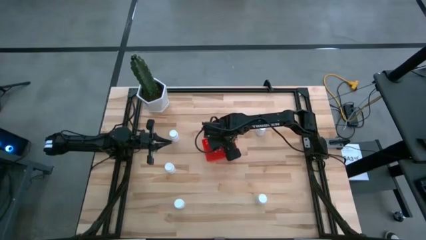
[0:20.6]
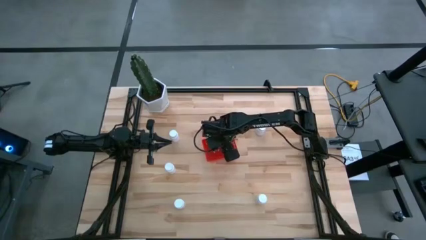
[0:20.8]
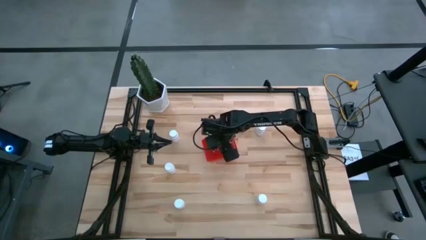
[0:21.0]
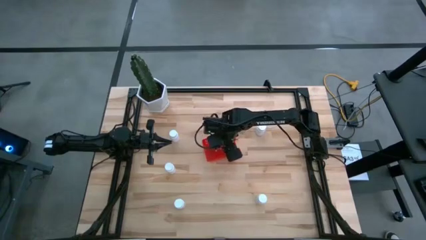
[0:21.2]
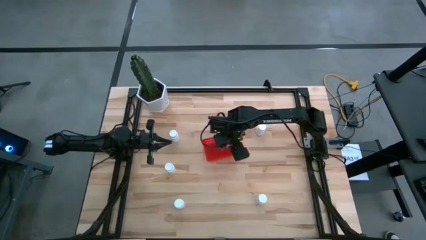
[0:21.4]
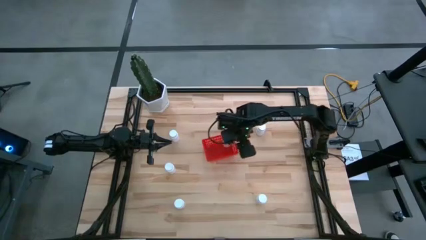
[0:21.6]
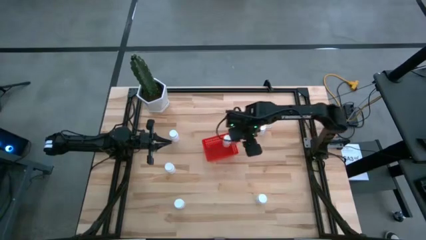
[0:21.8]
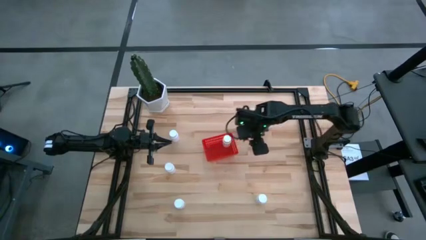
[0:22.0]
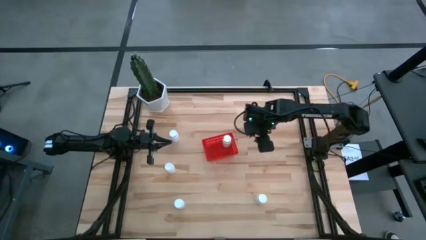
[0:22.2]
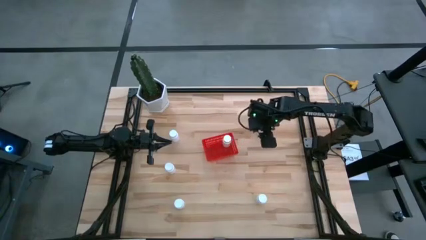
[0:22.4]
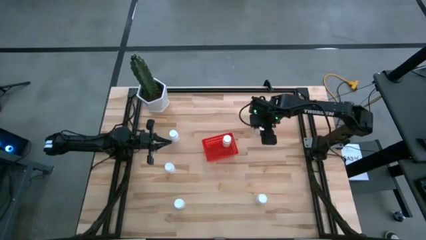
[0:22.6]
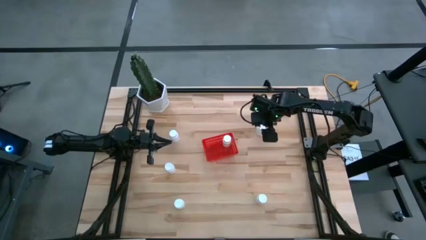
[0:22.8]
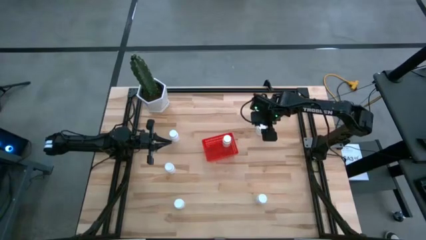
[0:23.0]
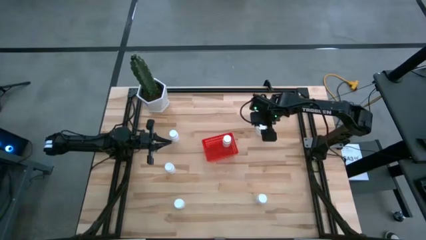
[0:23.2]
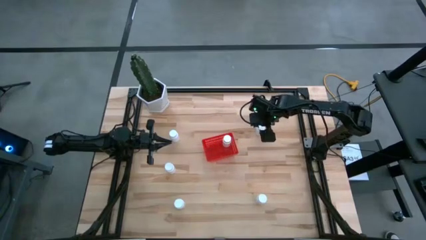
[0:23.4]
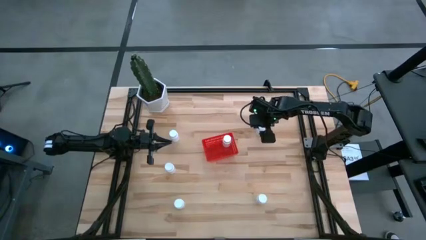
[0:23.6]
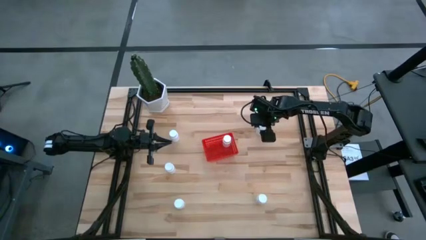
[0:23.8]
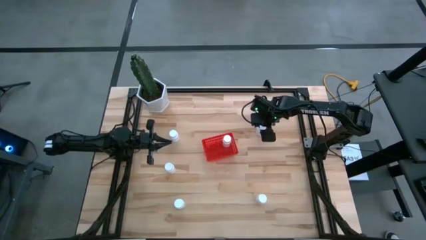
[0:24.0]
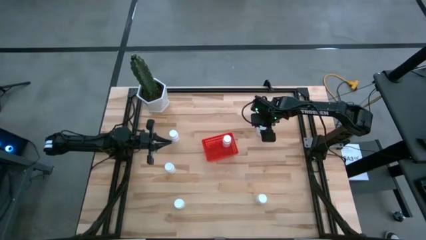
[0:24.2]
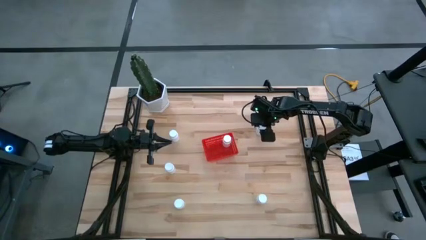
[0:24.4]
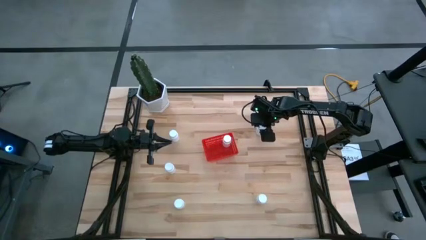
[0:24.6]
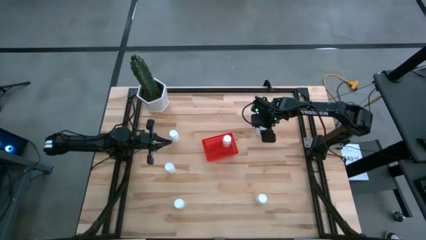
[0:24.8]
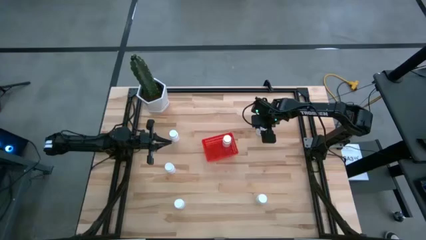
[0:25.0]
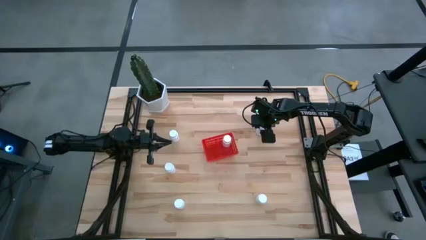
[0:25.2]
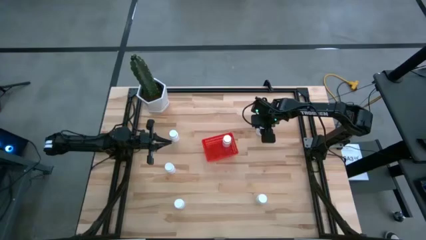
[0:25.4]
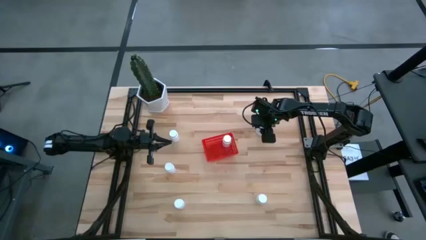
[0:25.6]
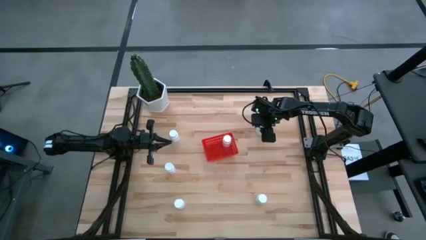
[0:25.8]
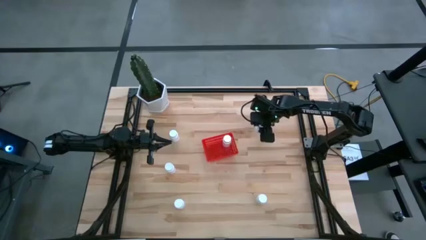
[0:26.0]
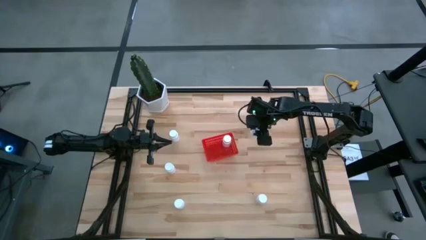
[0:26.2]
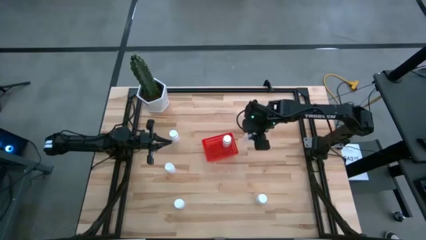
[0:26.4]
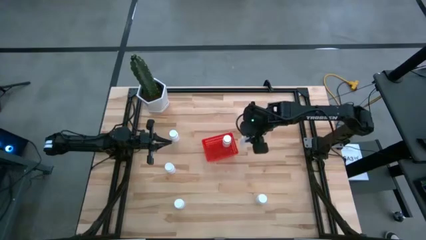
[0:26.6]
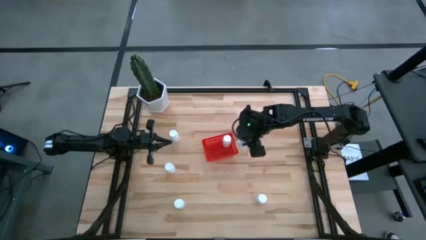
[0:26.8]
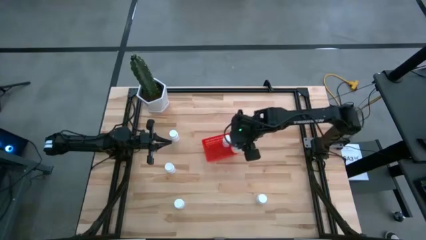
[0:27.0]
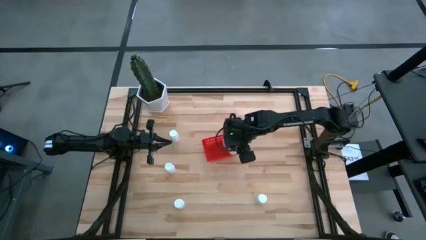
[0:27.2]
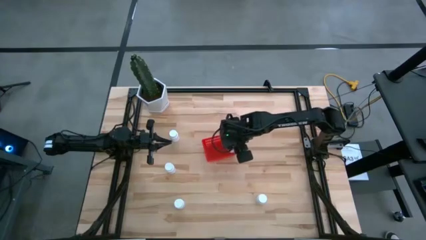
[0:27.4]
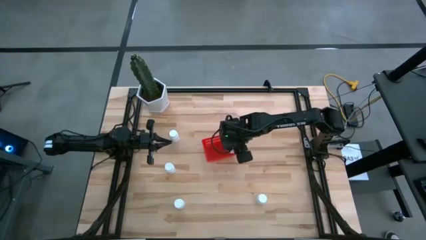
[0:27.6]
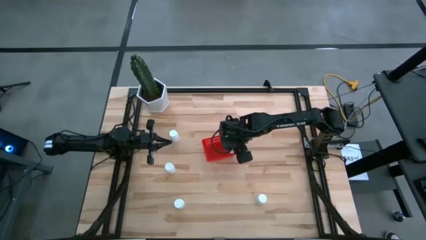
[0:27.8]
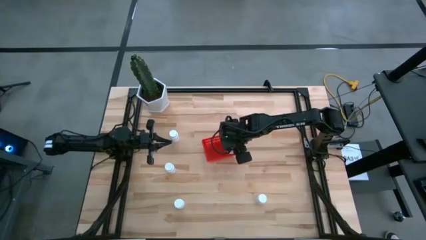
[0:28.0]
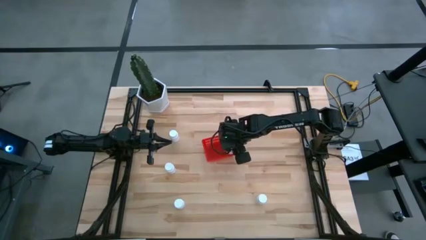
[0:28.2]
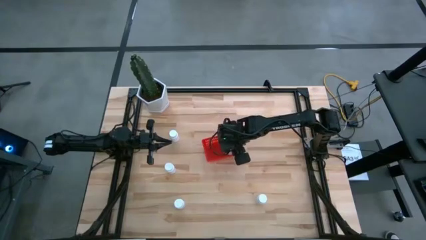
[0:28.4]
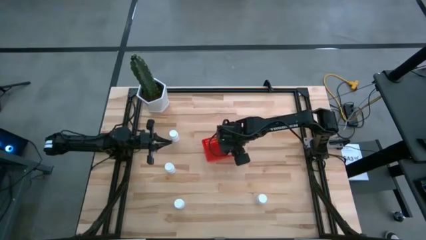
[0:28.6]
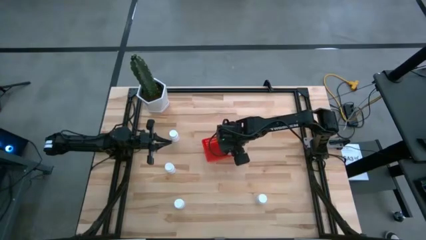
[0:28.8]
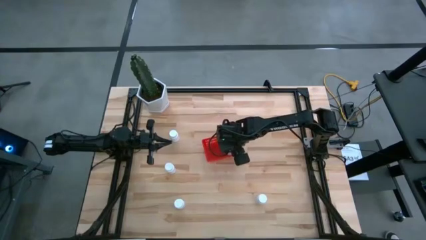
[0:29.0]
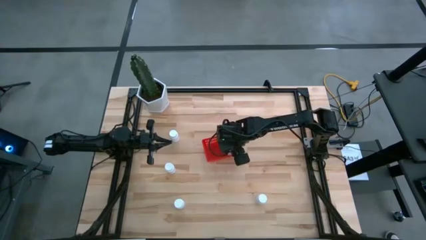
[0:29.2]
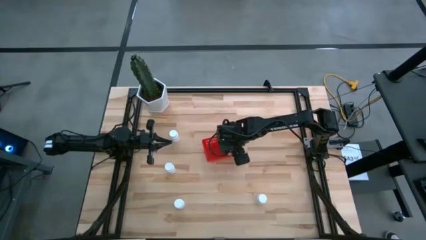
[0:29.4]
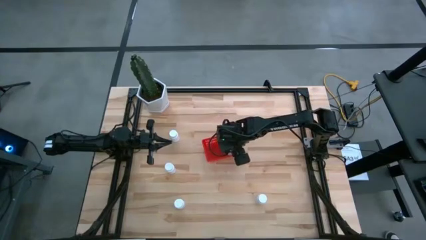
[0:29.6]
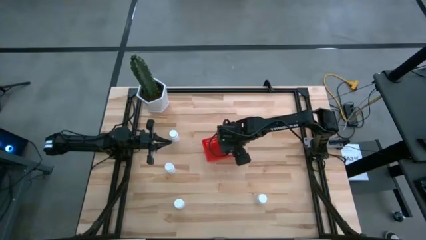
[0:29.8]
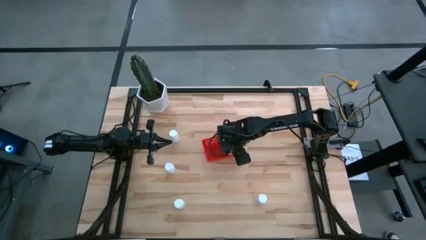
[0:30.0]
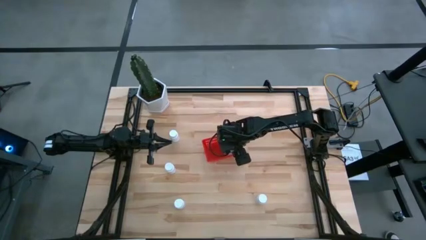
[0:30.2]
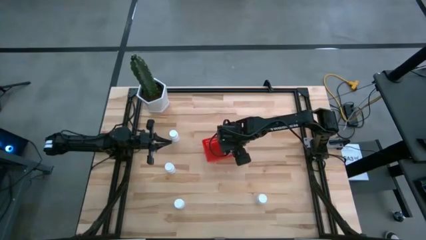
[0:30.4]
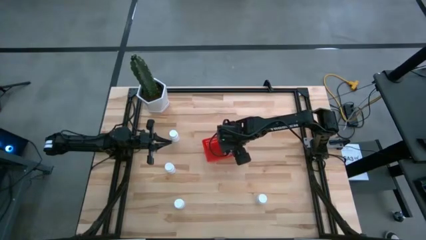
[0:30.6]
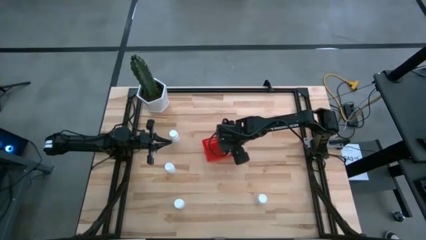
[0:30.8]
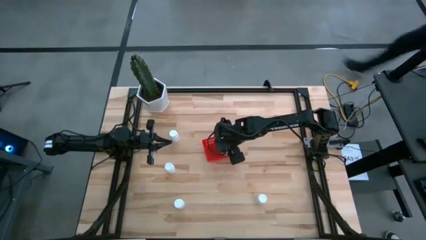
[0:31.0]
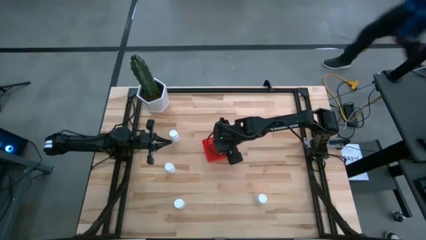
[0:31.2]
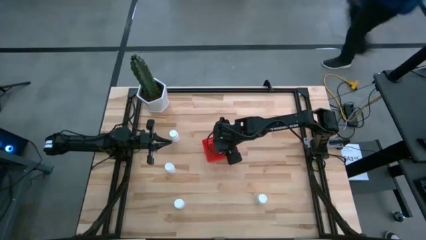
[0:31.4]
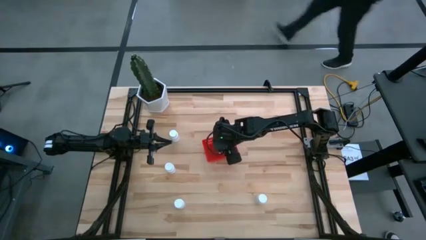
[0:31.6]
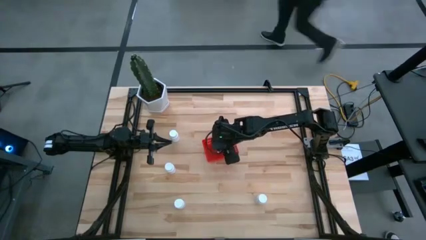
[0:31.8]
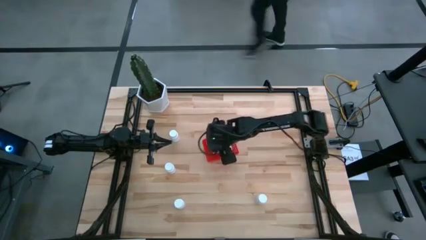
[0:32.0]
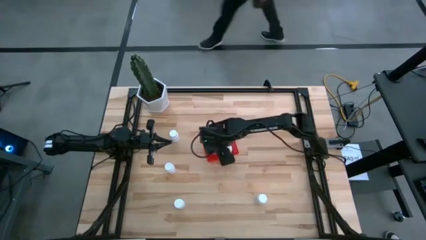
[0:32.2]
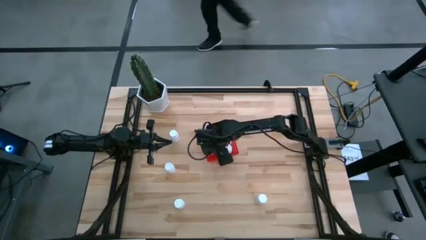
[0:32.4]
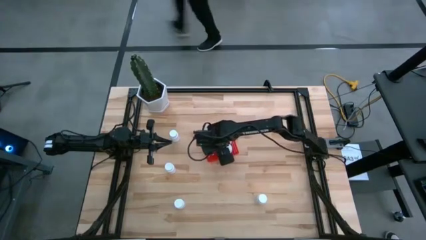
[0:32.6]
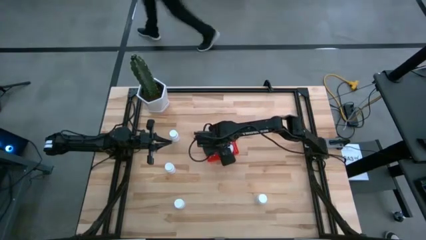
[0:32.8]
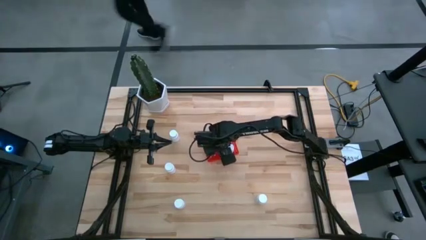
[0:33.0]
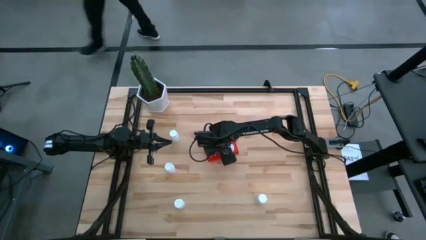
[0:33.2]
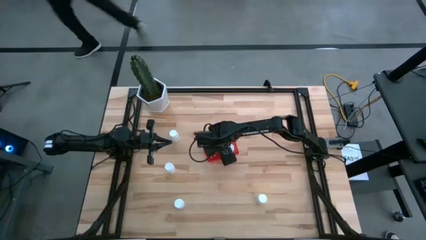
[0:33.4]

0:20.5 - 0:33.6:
Task: Pick and place pill bottles into a basket
Put the white pill bottle into the red bin

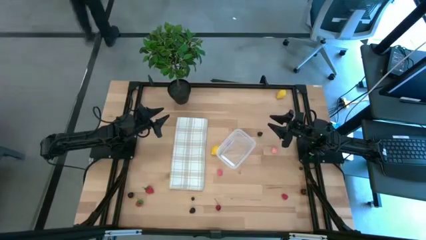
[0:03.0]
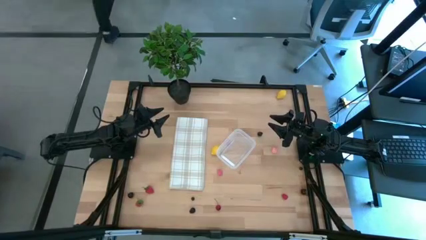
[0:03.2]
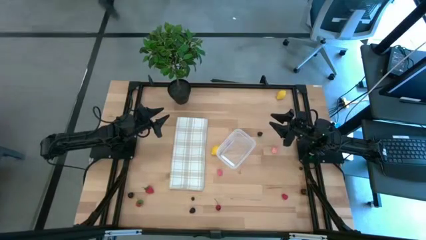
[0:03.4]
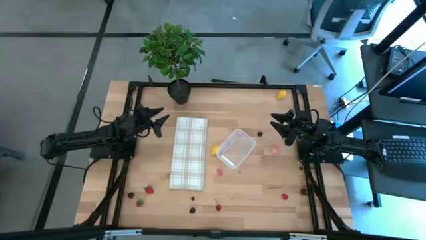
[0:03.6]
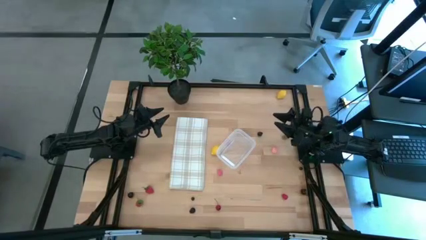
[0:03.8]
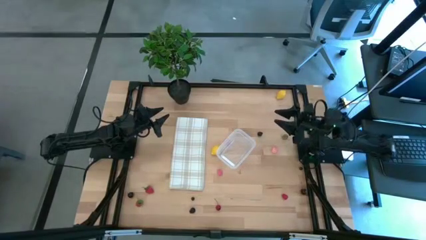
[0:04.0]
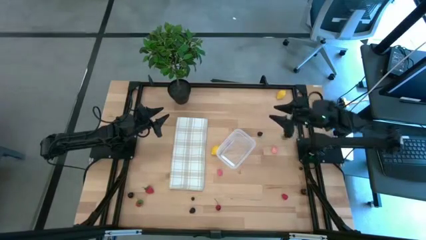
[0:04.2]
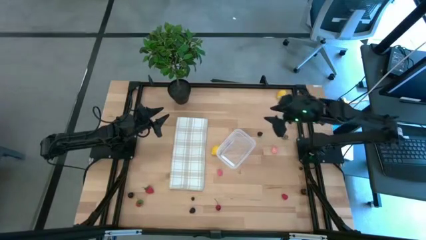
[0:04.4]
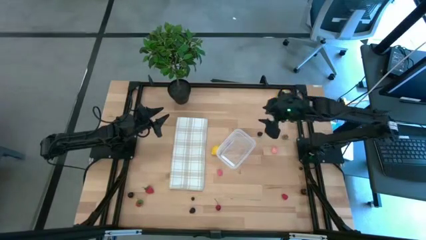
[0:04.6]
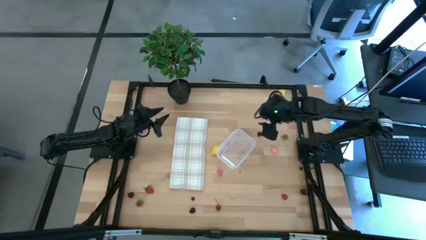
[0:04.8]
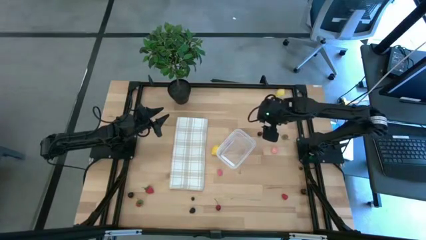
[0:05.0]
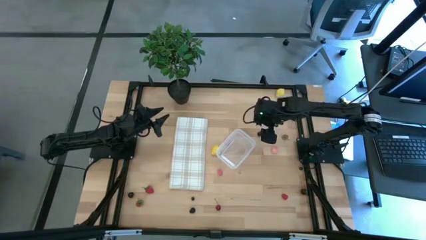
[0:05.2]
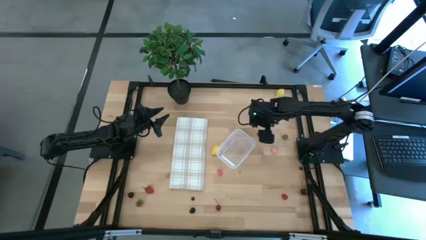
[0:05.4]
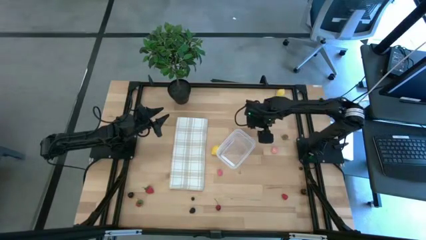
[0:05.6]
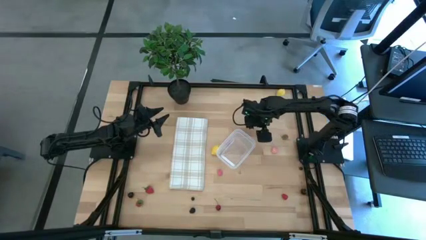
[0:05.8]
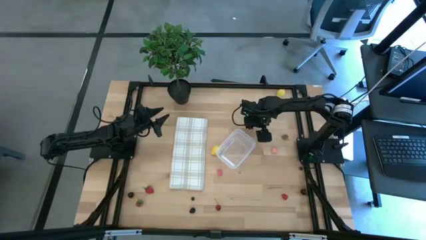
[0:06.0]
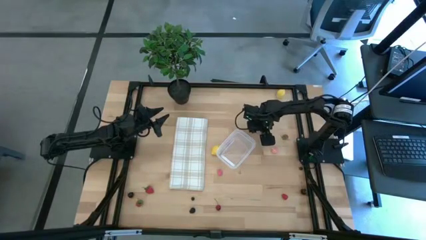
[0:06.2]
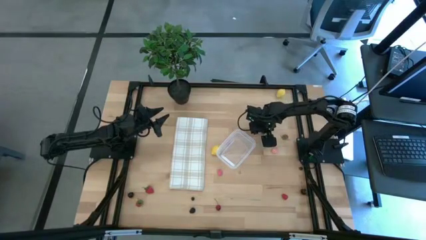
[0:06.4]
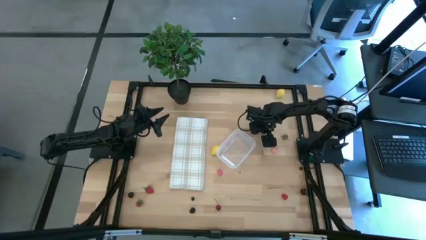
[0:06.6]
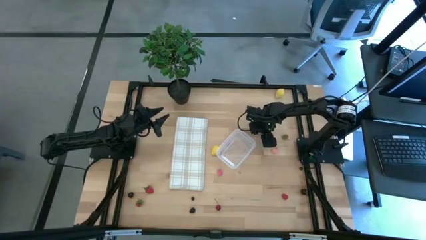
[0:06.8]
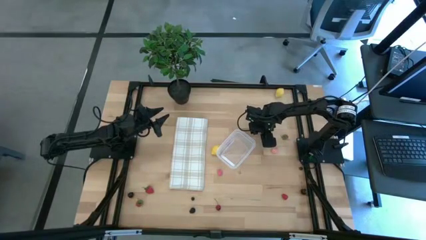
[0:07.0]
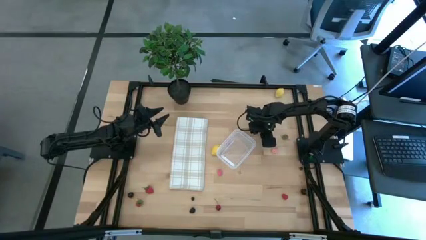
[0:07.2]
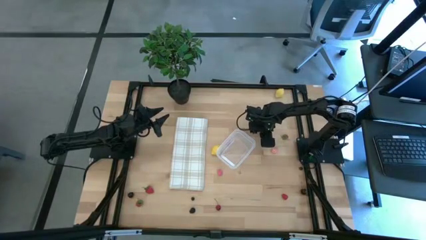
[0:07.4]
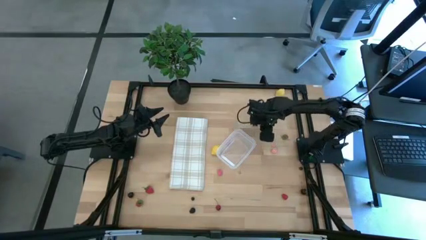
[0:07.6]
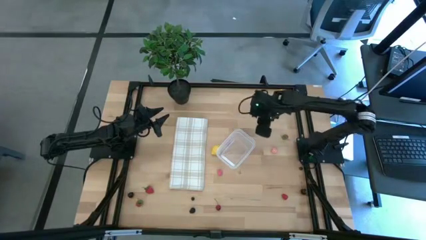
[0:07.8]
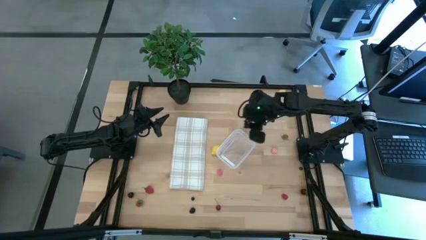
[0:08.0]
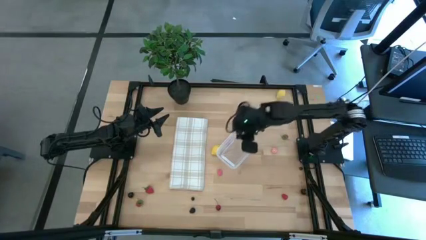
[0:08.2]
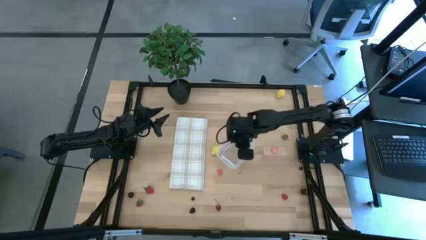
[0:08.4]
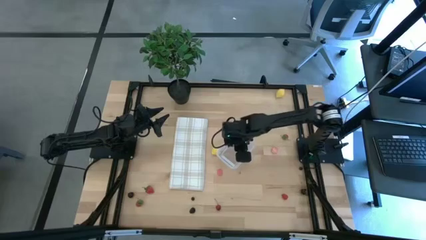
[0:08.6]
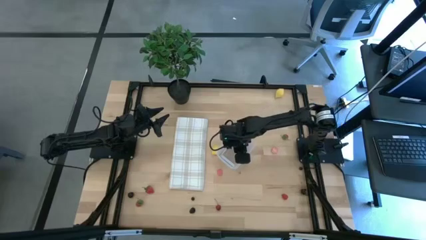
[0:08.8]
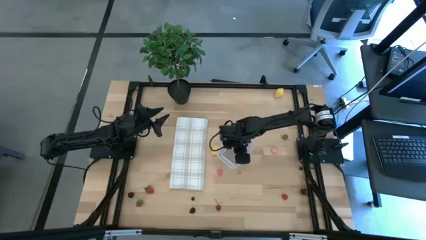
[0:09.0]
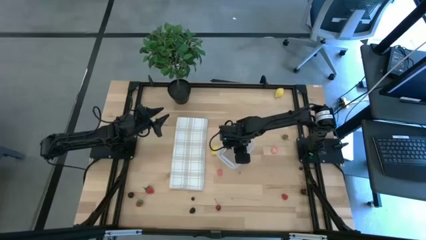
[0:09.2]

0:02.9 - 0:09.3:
Task: Pick and placing Produce into tupperware
Put the top blackberry into the transparent bin
